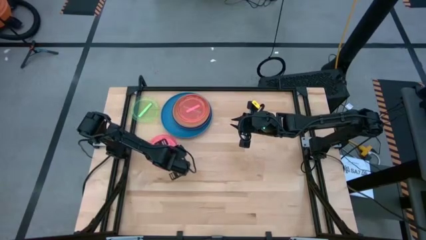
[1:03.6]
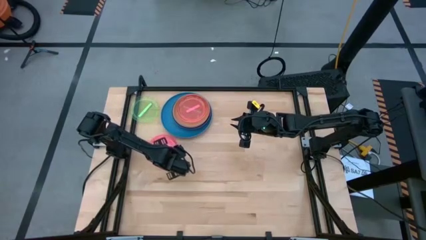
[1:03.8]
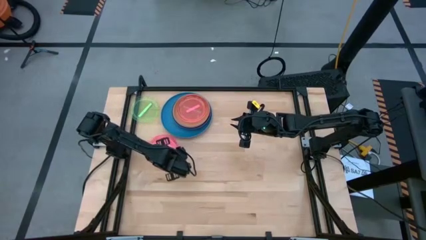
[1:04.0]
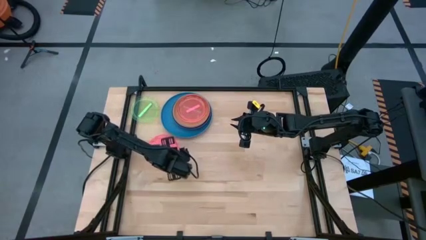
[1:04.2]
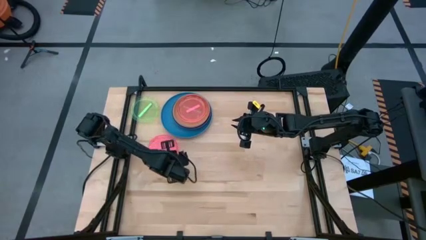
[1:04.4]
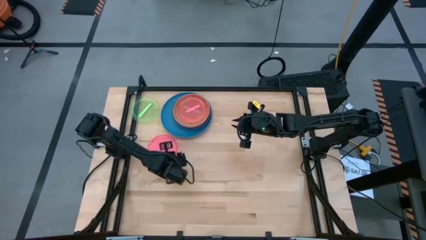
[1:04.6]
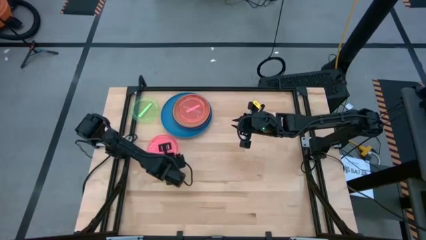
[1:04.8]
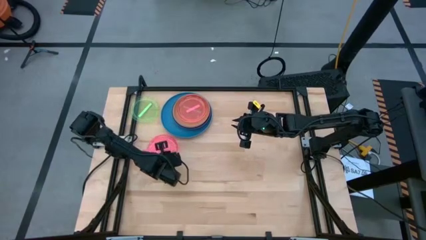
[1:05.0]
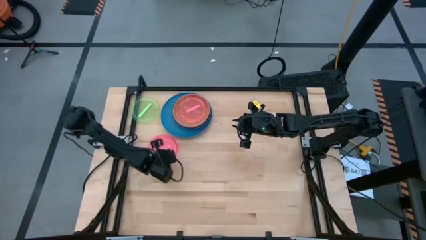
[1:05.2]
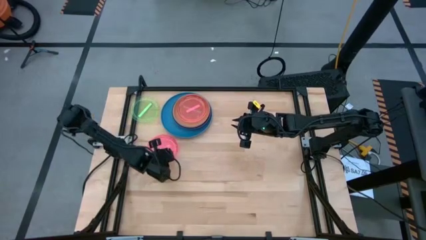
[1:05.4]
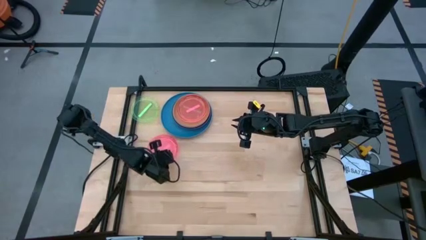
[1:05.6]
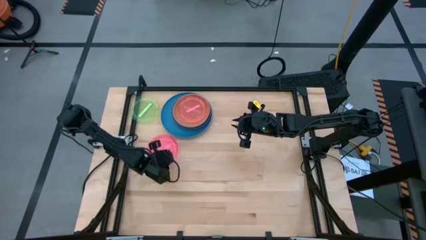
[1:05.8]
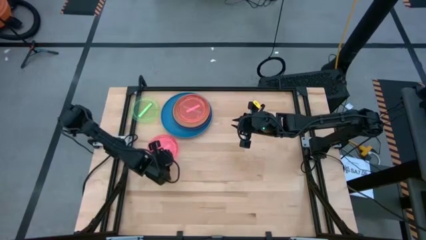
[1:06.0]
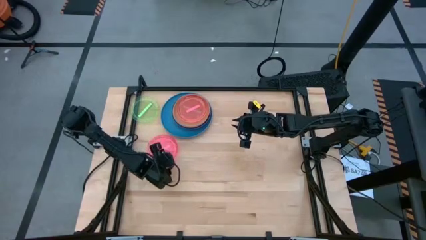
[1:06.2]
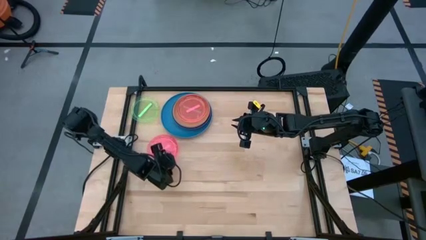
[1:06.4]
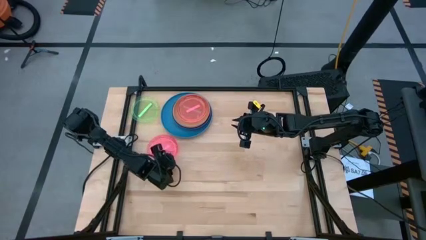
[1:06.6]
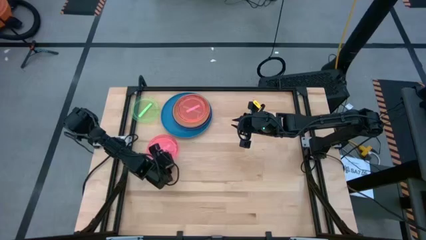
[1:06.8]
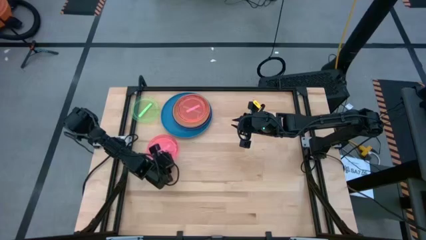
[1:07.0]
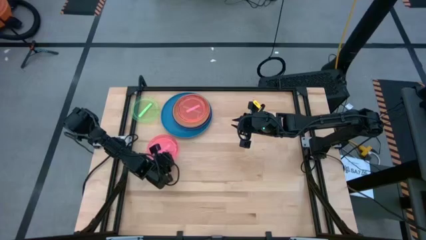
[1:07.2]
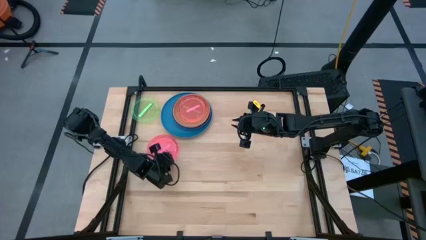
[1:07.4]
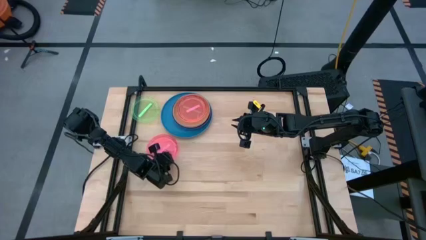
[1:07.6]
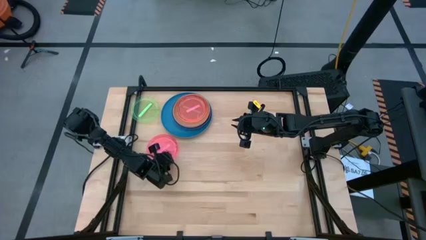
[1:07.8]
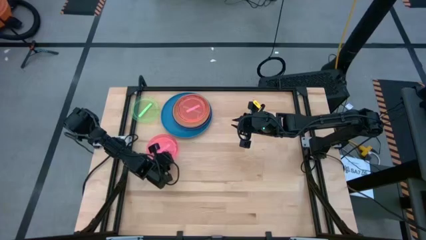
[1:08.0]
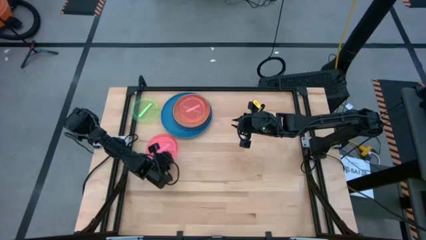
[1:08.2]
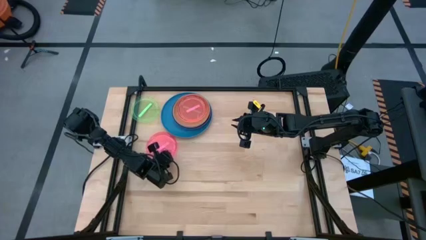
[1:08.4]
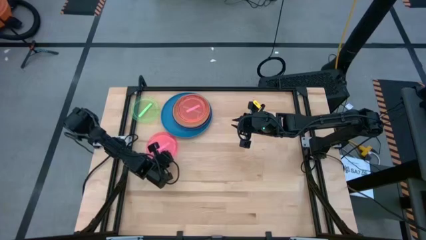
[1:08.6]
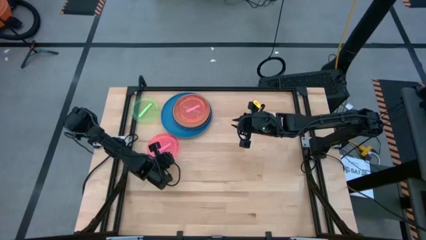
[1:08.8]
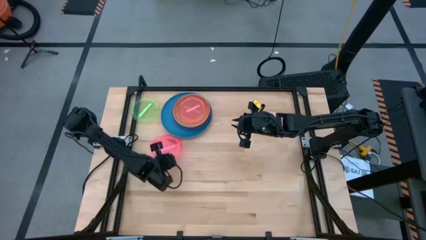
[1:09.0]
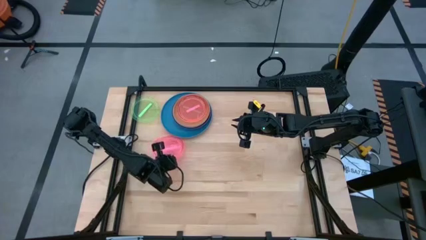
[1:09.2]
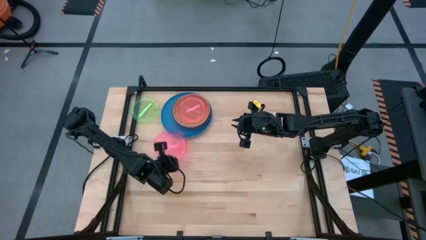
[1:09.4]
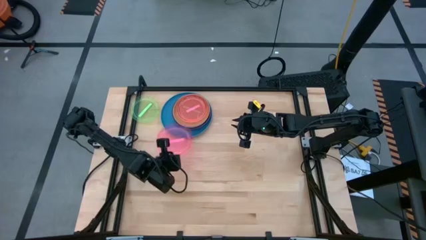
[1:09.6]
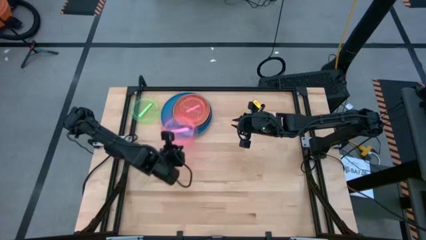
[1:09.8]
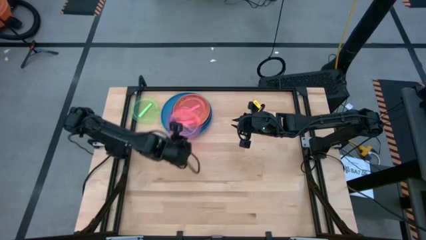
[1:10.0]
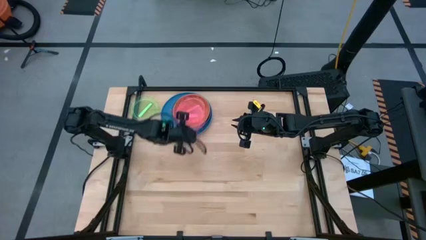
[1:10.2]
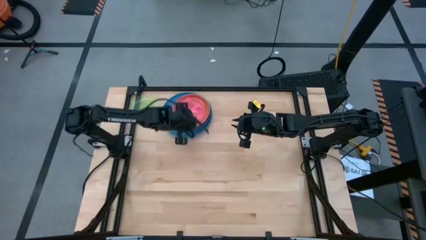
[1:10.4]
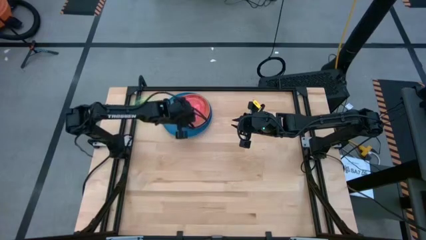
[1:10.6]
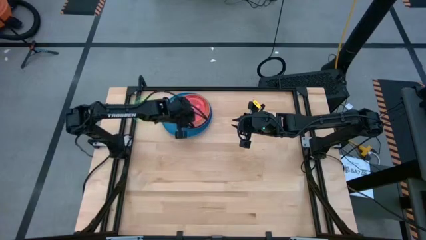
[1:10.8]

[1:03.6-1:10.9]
Task: Stack plastic plates
Stack the pink plate on the pink plate

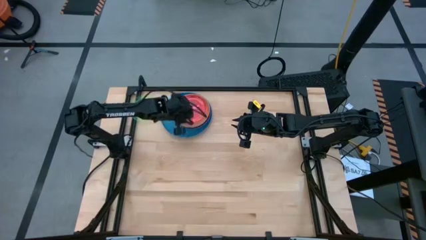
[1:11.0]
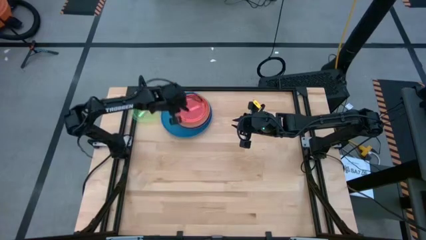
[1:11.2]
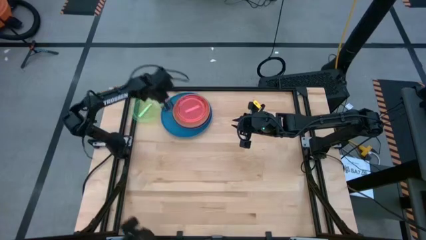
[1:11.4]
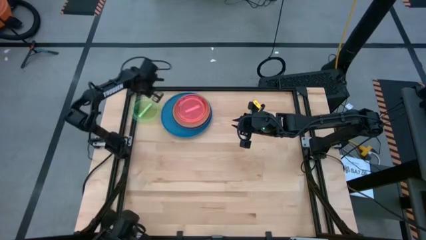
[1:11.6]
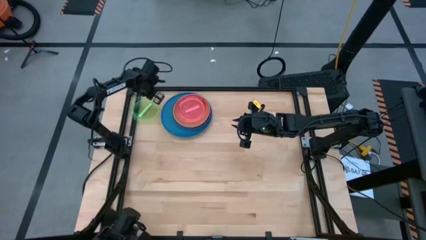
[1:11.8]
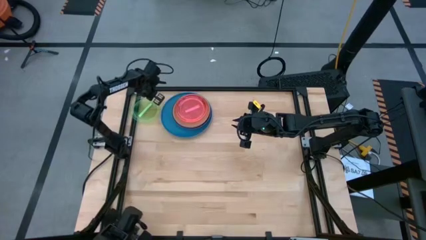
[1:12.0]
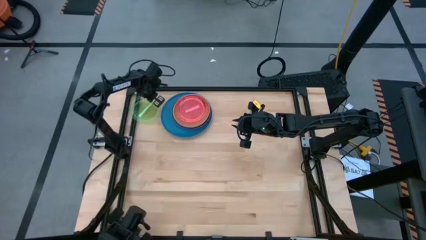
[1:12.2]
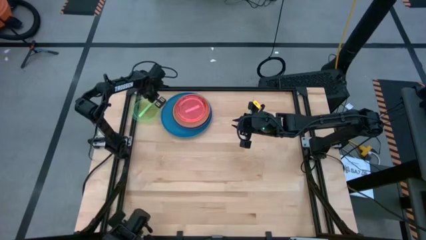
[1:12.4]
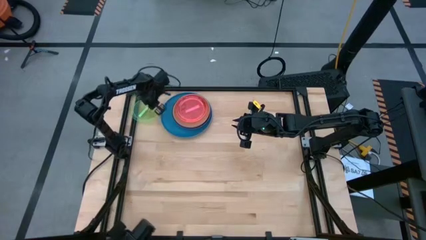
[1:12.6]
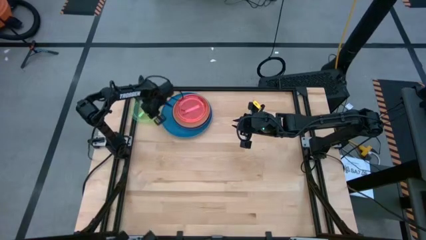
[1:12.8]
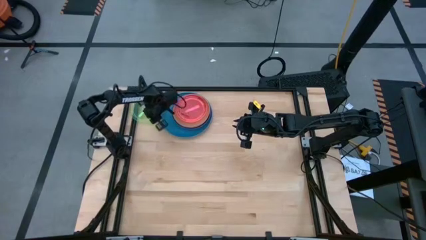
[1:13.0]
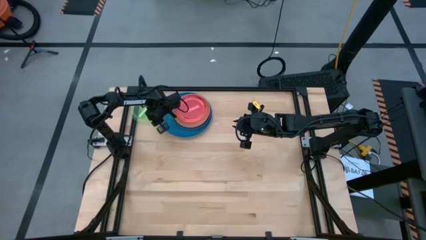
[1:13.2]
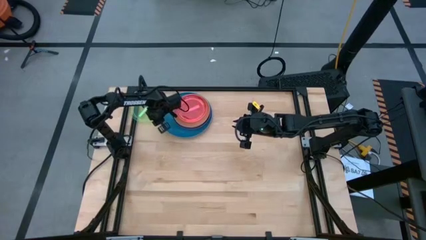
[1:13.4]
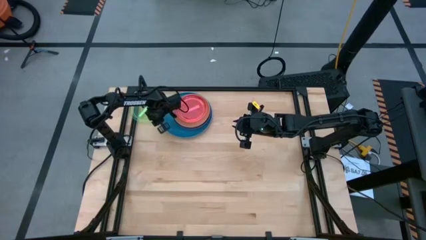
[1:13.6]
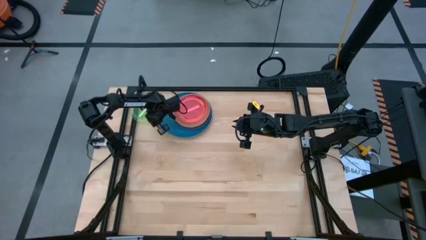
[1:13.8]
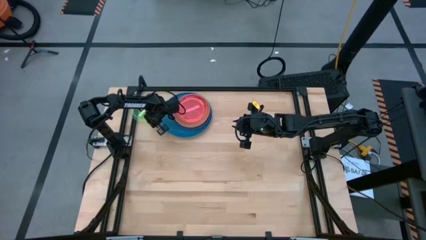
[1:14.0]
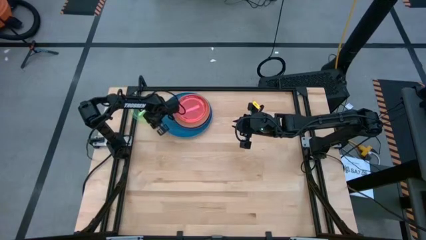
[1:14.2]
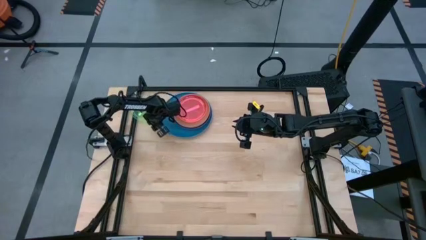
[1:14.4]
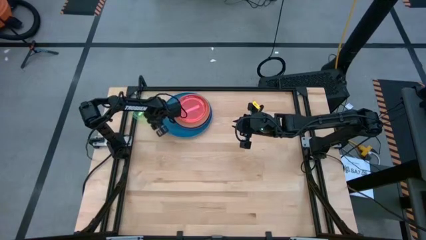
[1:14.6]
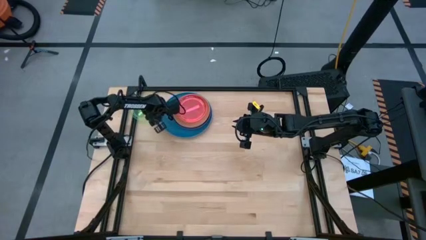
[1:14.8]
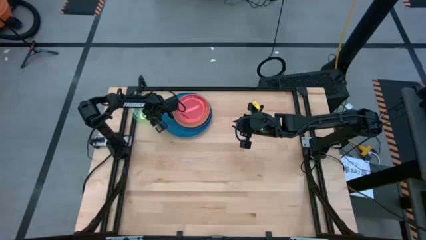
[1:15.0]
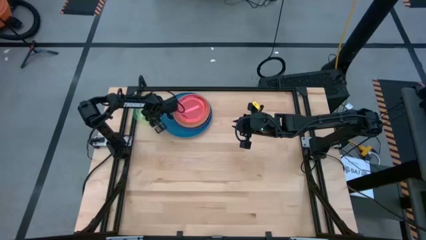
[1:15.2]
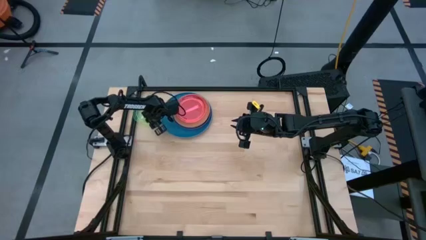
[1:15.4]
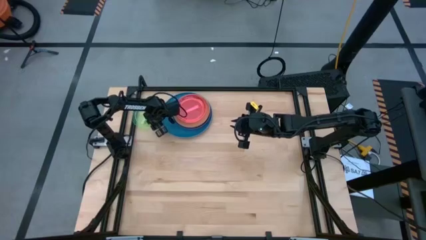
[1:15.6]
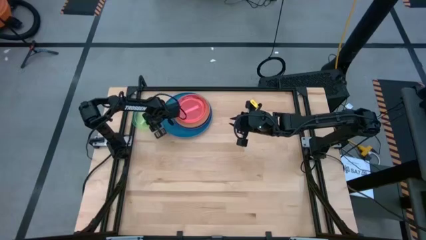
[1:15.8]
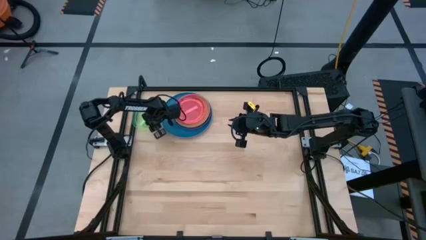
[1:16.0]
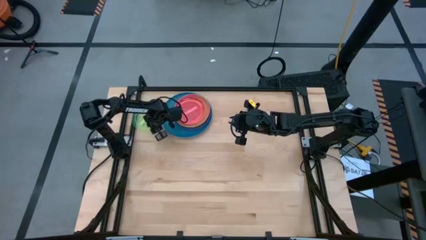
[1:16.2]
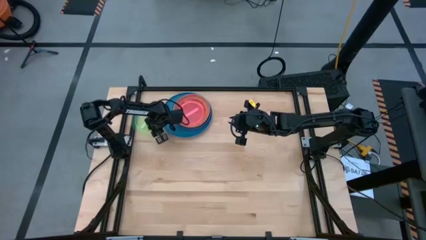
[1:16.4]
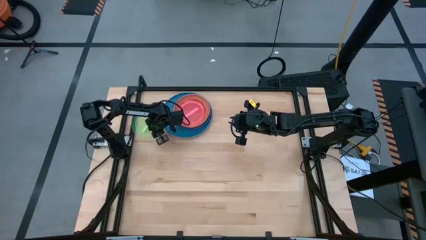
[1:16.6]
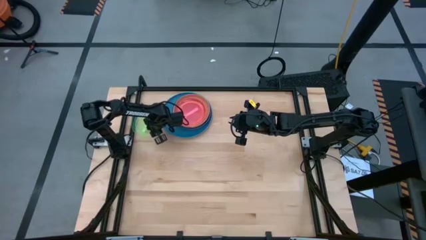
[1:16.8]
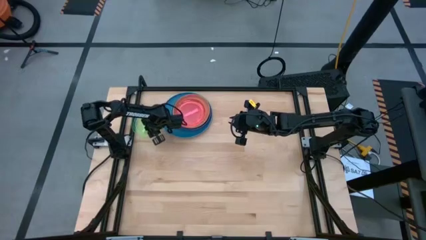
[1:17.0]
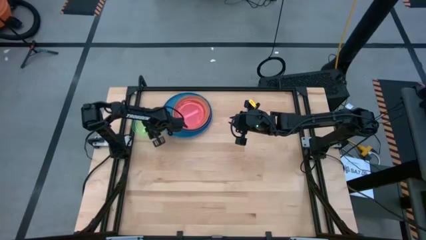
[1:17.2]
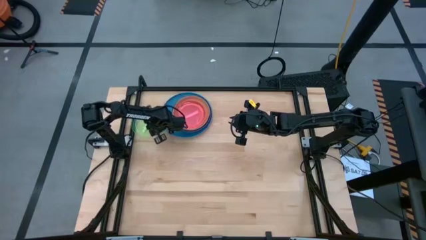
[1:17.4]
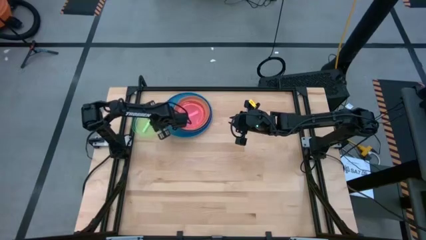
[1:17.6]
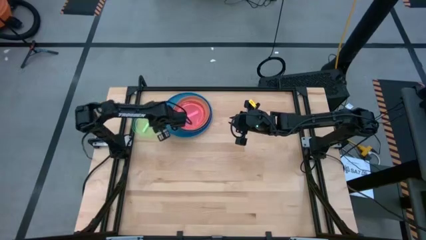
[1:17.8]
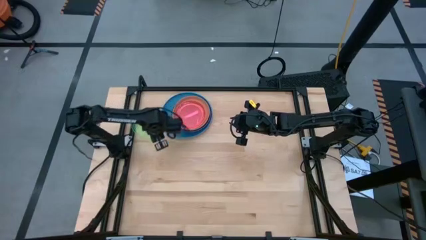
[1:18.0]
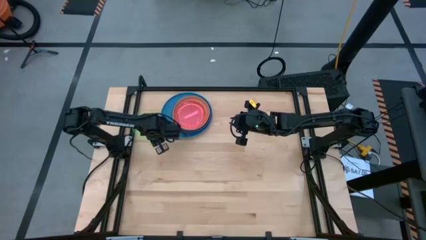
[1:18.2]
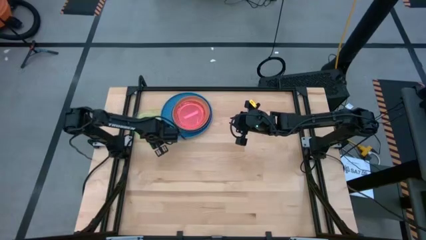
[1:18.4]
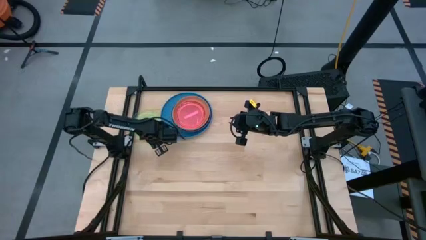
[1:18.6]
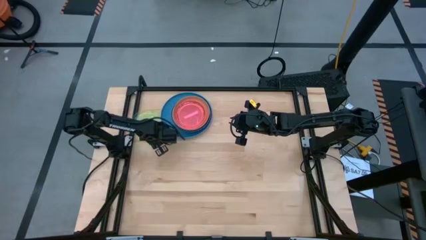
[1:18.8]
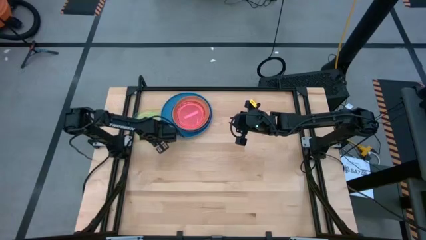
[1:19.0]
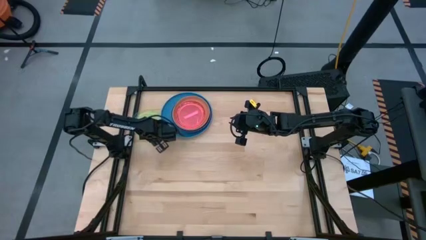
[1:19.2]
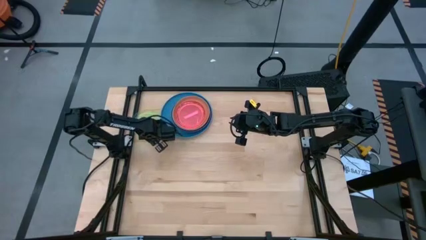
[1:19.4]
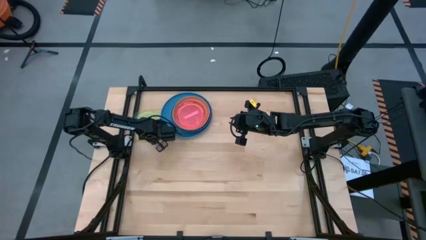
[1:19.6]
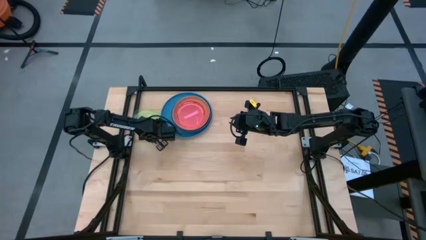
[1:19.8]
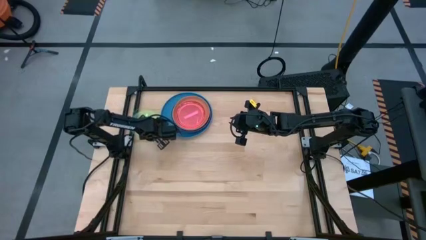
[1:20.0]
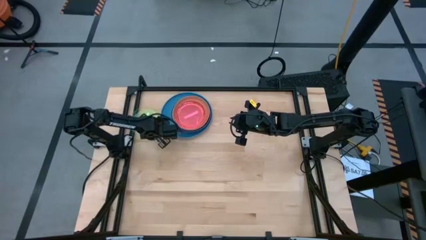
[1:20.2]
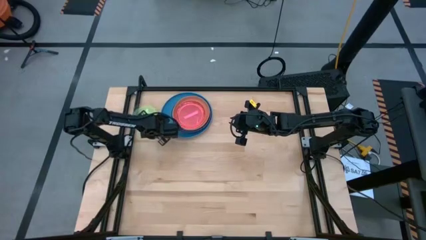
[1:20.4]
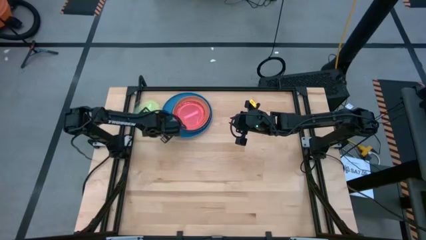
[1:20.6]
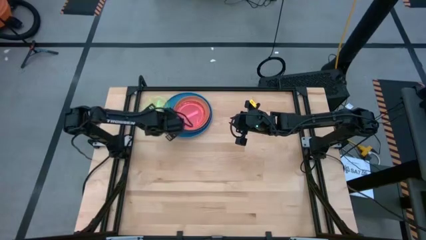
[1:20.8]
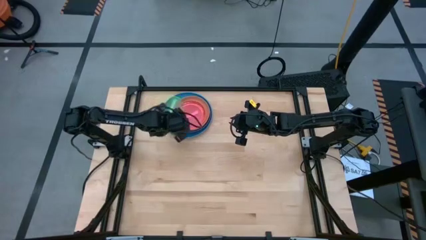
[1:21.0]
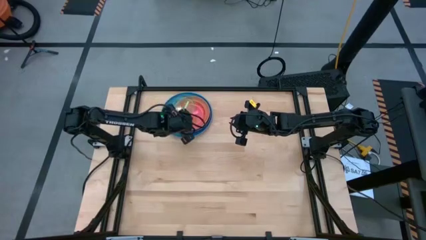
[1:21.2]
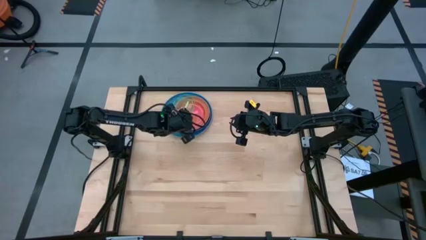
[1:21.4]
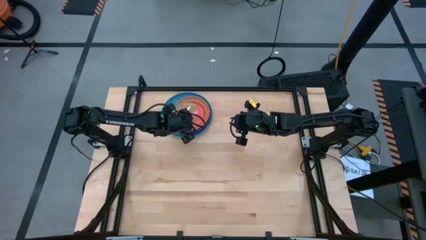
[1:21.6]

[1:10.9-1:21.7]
Stack the green plate on the pink plate
